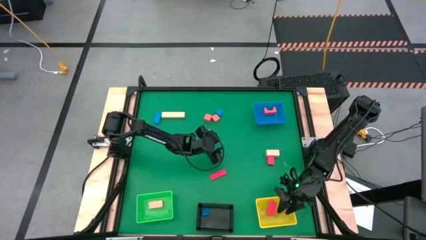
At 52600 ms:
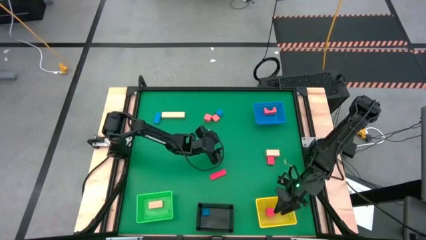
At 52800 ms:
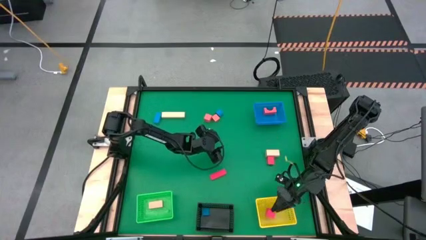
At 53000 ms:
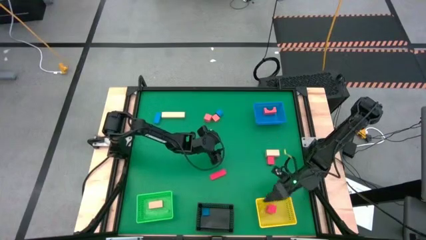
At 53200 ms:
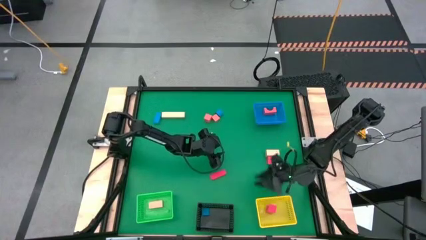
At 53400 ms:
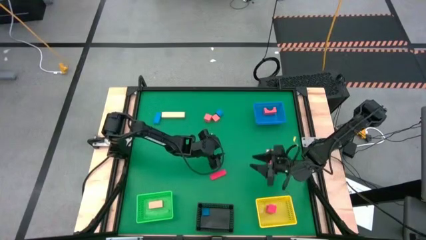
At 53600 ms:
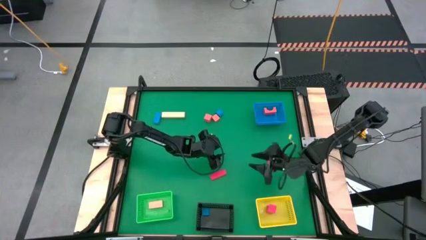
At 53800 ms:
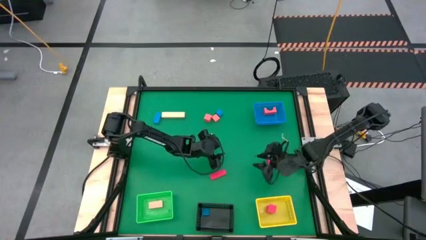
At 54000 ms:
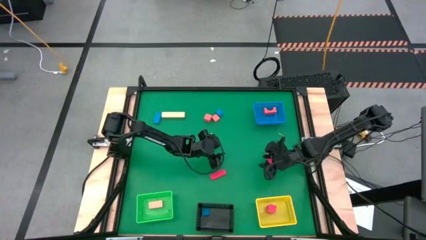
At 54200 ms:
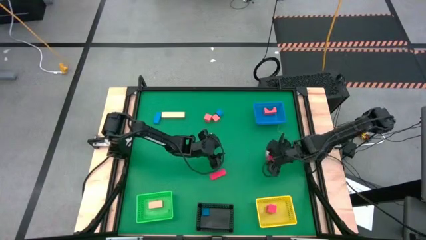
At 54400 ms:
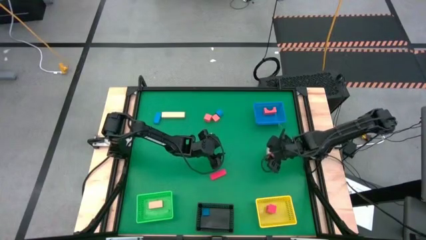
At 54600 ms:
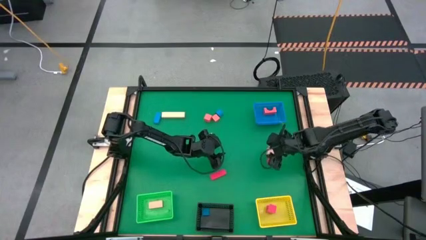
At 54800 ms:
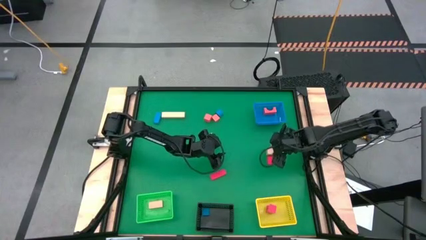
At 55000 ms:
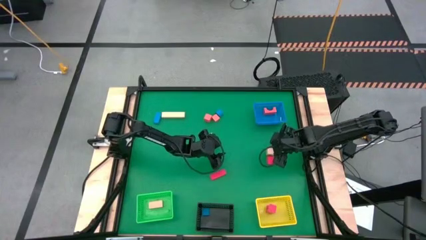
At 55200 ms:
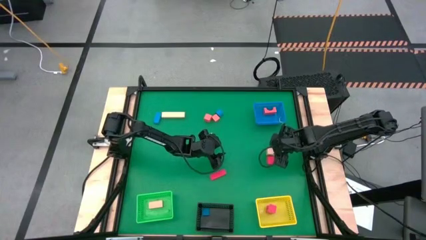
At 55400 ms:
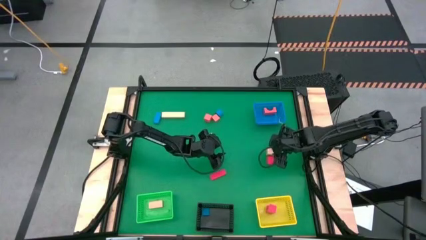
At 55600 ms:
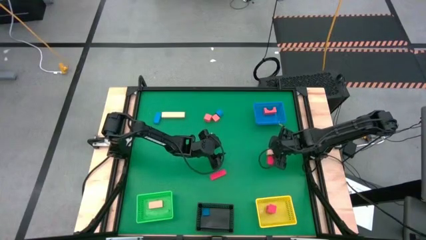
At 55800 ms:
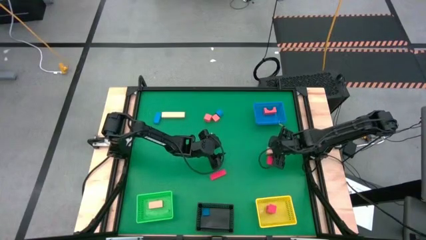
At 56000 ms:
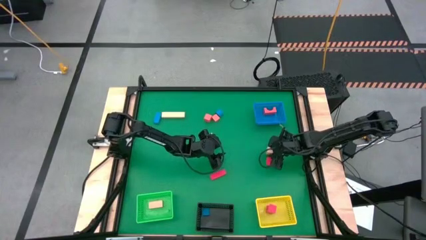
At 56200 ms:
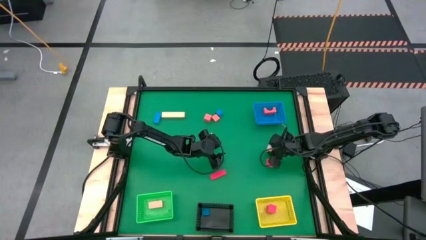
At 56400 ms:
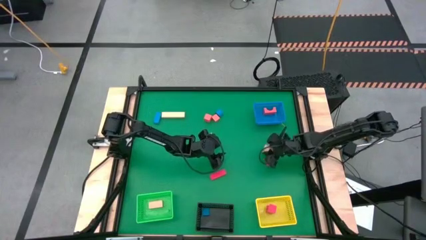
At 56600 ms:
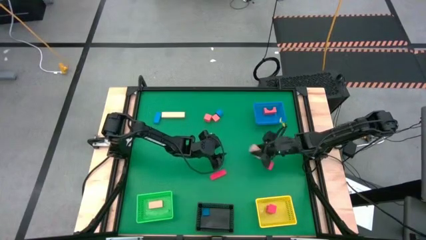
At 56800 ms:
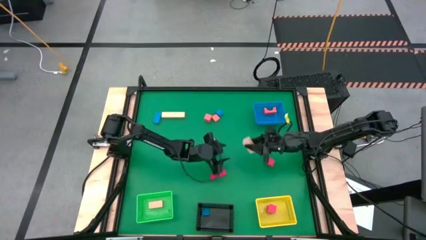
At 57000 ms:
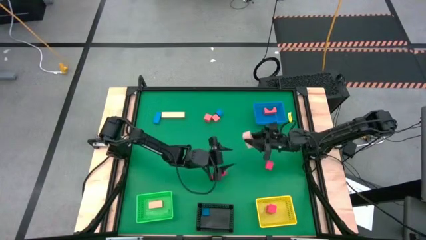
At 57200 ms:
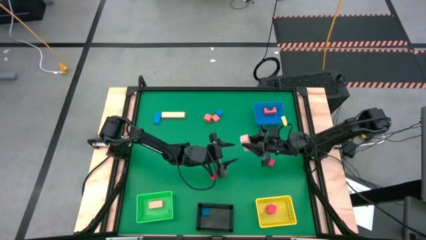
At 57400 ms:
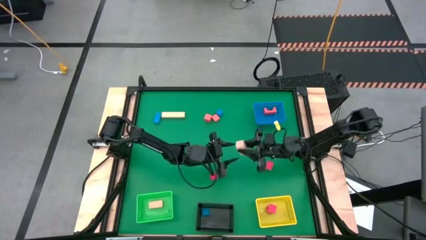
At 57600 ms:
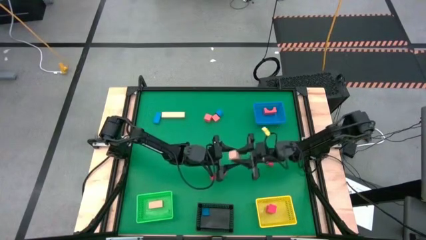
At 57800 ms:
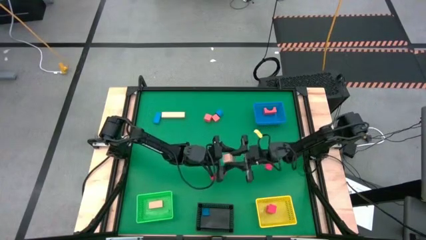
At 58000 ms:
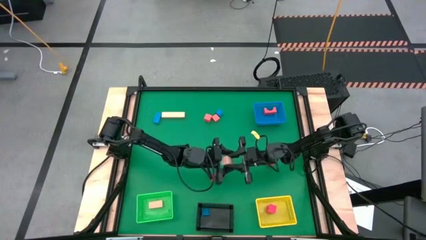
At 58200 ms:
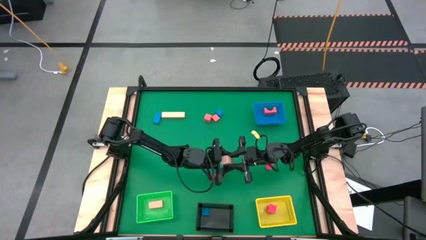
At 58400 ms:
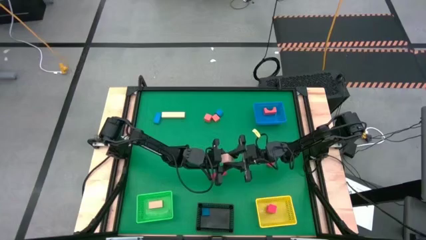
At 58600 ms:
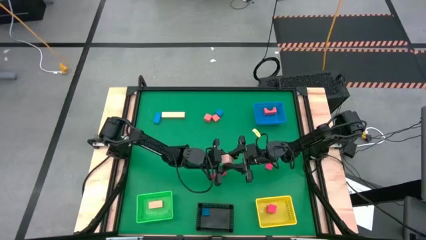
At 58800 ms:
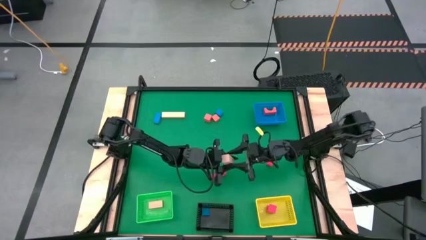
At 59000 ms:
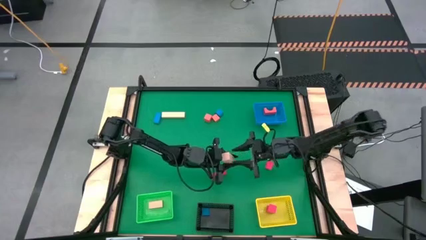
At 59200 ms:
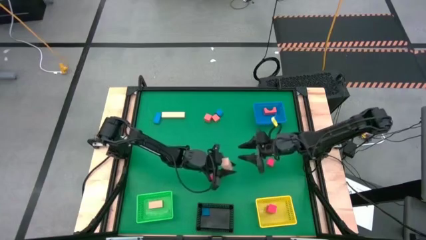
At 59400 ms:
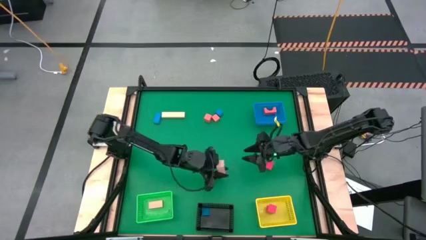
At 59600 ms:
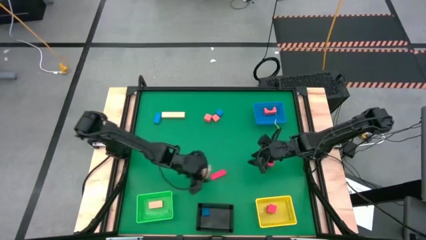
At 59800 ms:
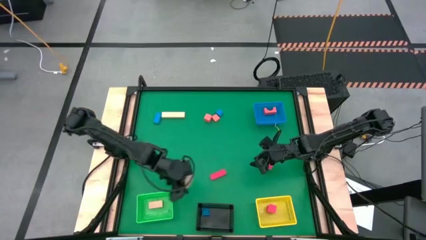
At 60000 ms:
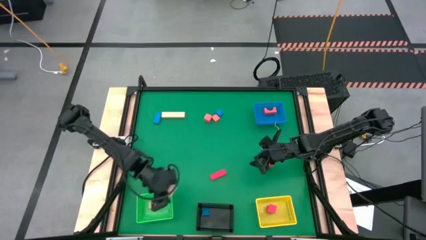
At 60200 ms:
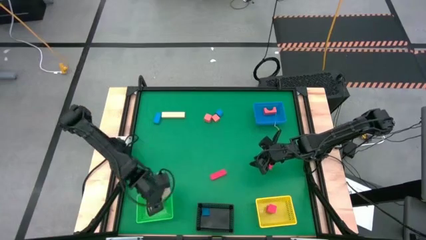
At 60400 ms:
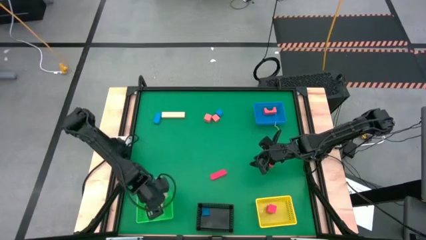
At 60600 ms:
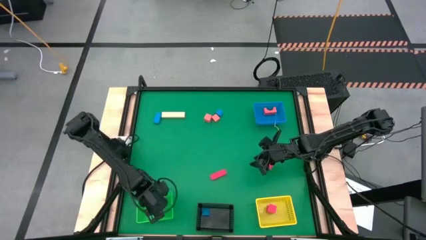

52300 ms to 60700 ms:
Task: Sort & place blocks by color
Put the light brown block into the green bin

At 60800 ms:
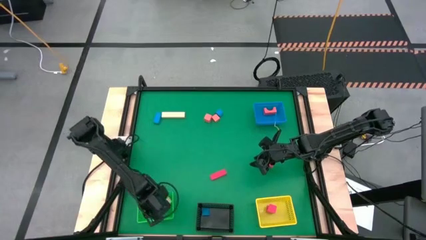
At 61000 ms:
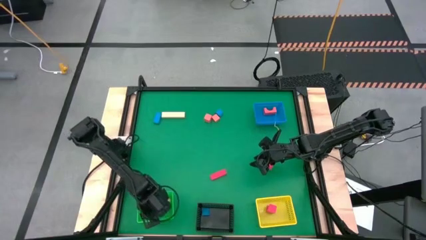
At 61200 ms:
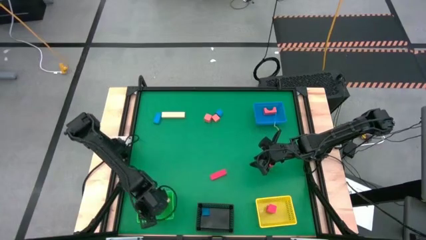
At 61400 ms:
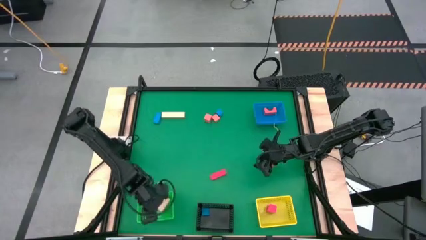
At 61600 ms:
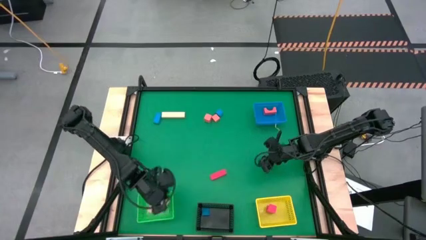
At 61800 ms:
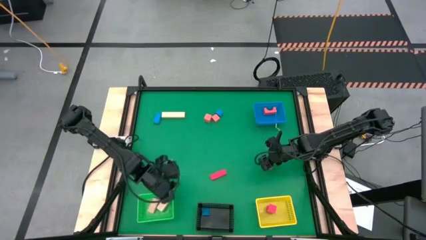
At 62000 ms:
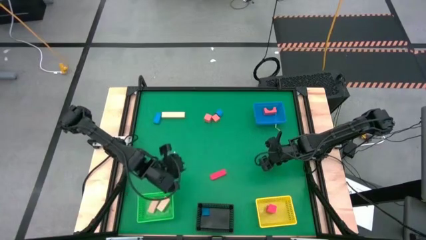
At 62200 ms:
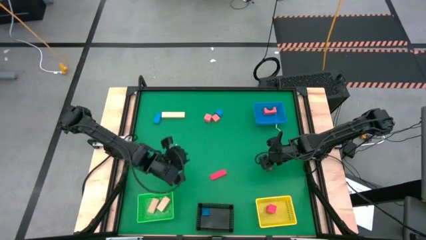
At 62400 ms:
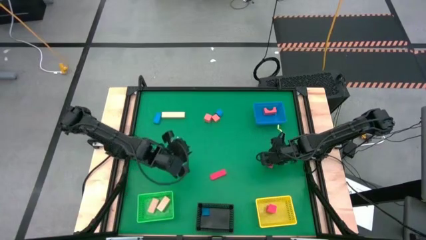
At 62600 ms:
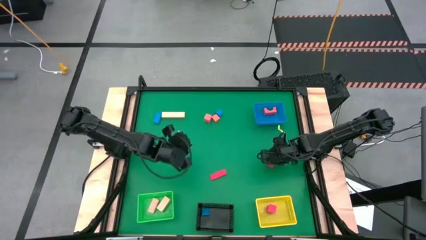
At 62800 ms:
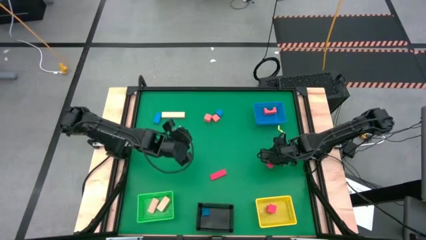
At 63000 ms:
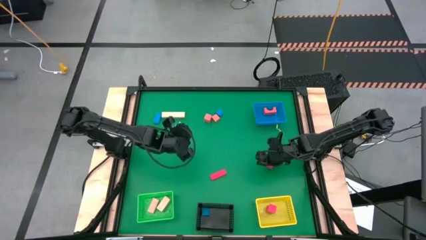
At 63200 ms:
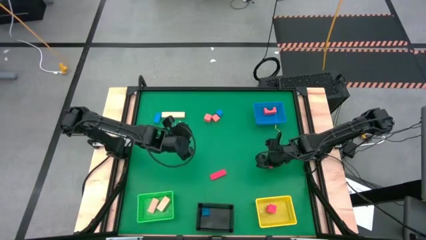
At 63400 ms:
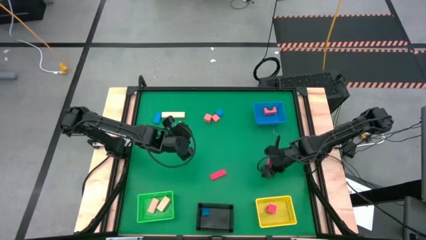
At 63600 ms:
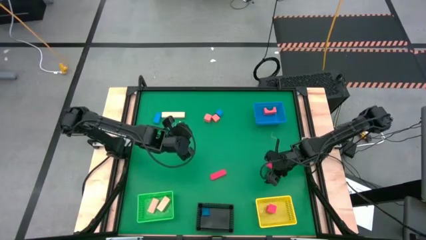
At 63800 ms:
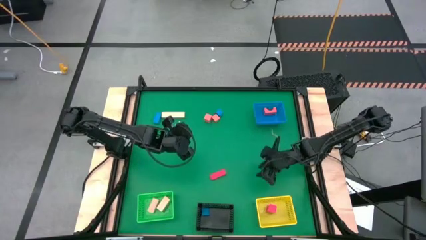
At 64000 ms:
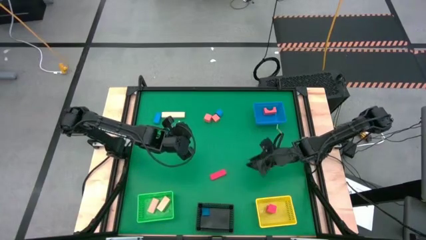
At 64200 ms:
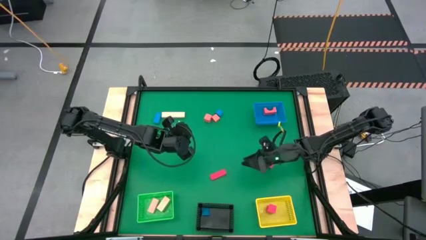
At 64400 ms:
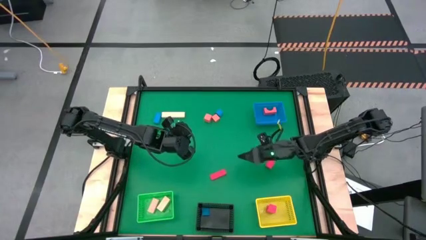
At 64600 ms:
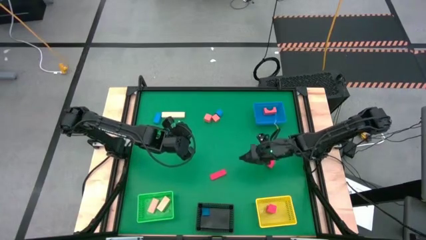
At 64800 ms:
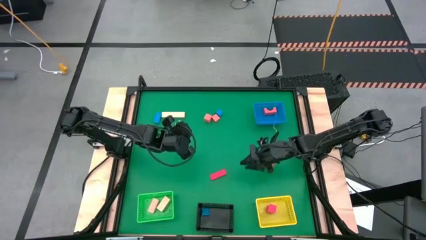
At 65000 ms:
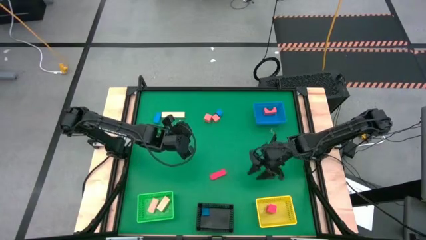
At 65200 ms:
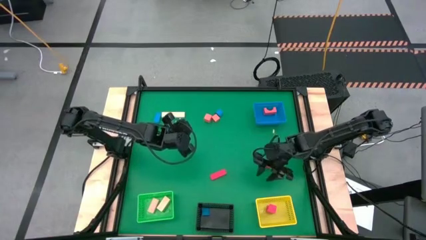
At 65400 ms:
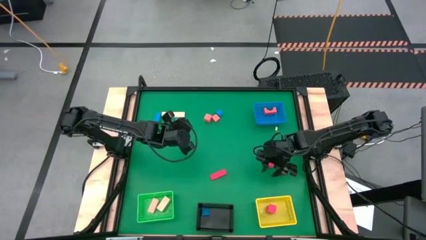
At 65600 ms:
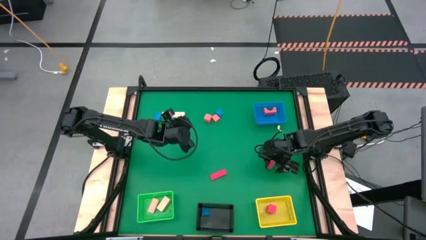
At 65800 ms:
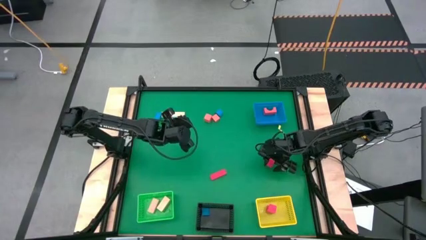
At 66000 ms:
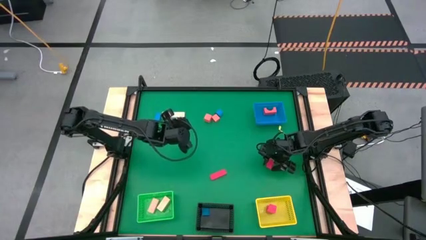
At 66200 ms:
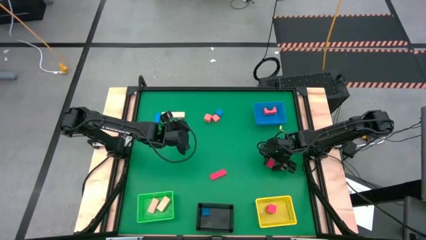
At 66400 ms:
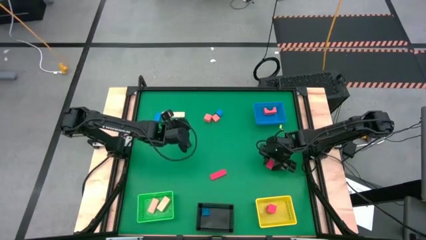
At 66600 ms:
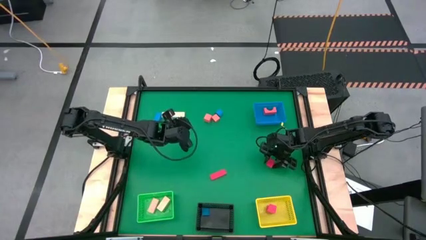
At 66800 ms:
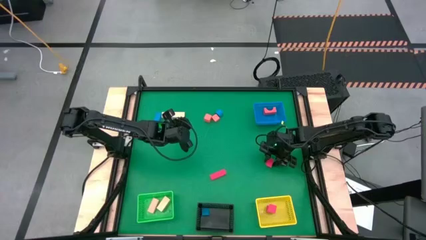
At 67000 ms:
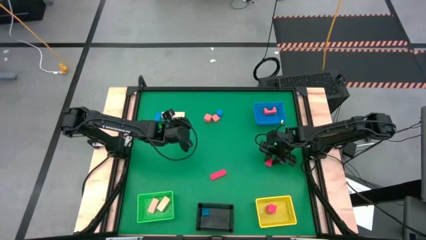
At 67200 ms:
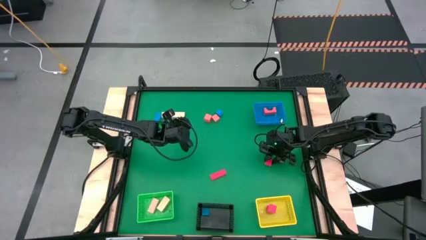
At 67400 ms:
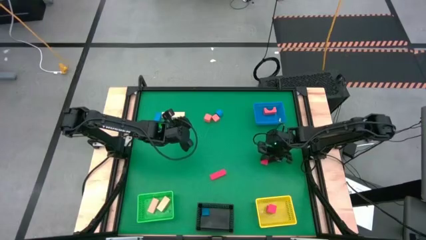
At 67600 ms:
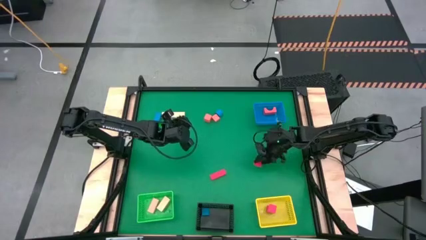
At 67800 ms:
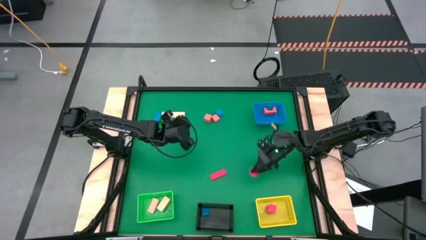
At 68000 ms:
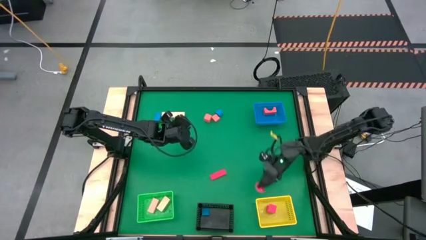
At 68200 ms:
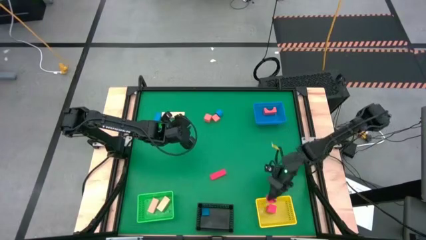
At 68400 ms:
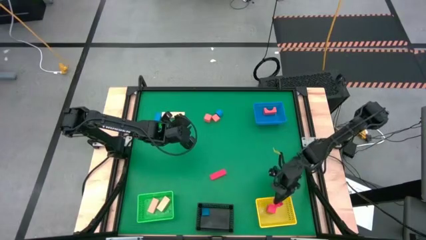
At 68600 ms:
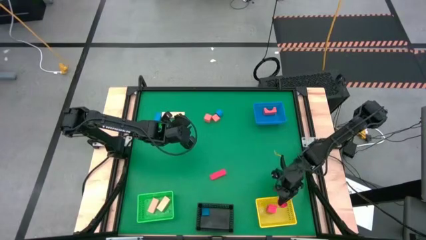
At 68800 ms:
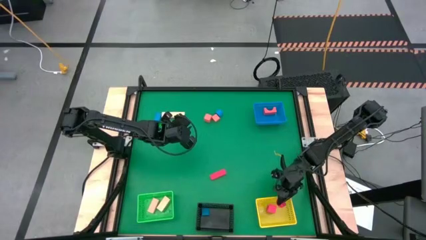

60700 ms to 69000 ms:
Put the red block into the yellow bin
